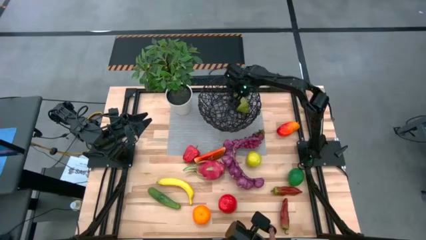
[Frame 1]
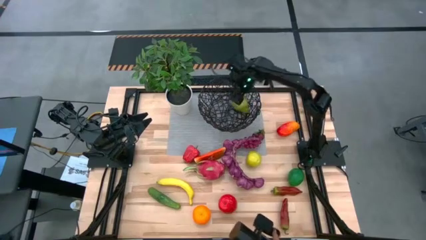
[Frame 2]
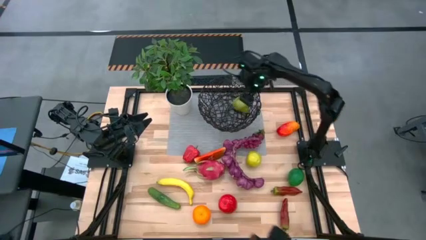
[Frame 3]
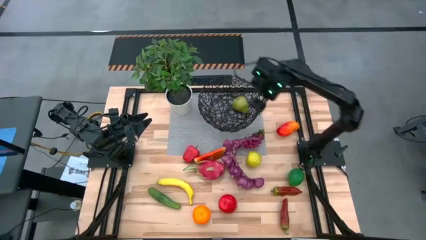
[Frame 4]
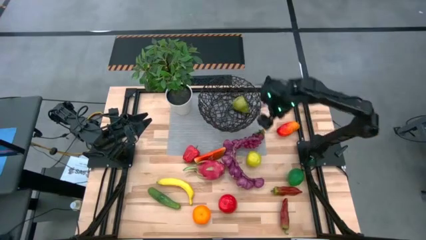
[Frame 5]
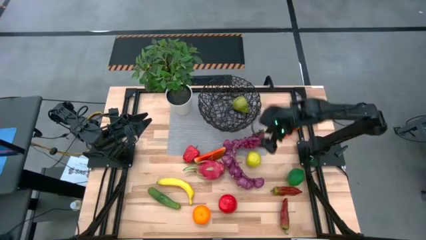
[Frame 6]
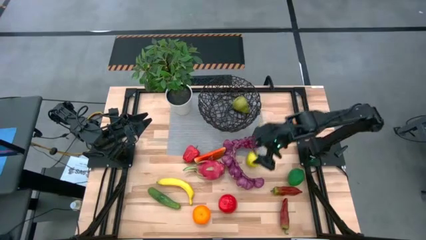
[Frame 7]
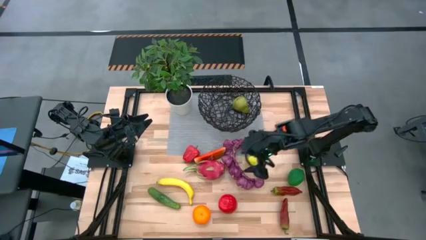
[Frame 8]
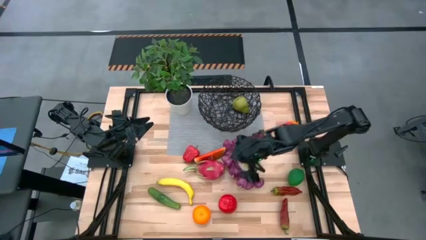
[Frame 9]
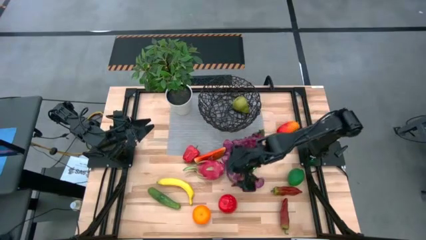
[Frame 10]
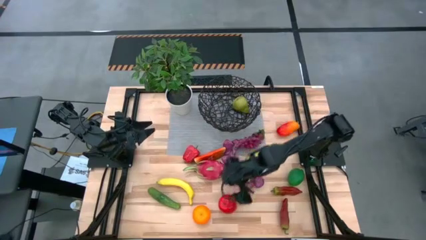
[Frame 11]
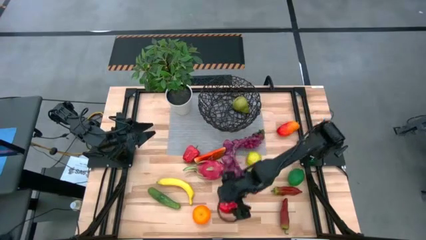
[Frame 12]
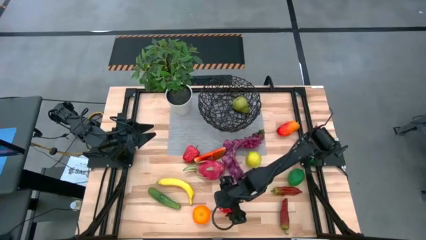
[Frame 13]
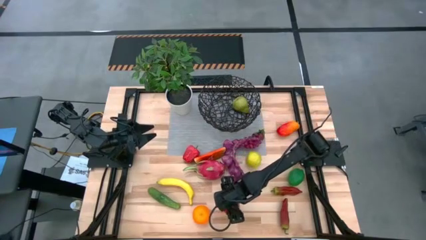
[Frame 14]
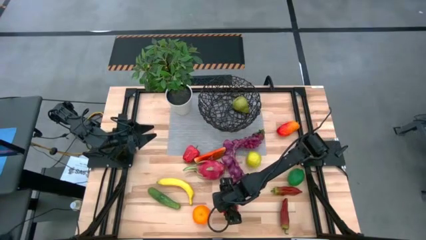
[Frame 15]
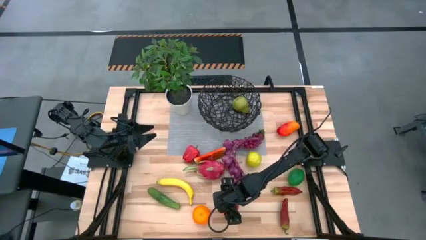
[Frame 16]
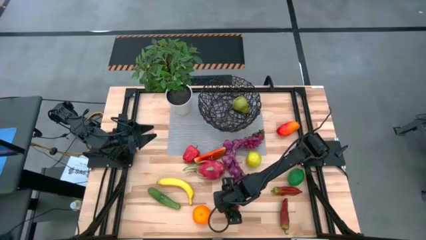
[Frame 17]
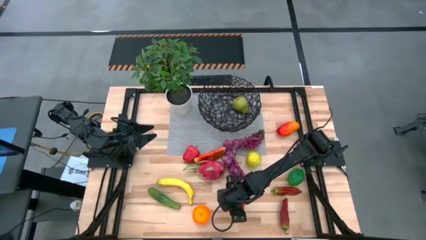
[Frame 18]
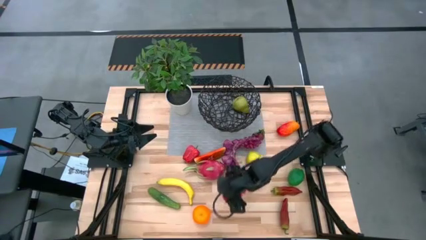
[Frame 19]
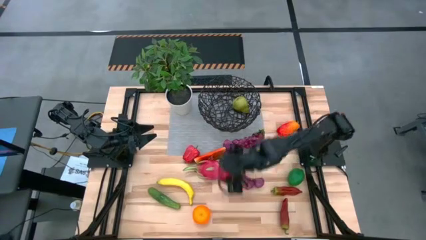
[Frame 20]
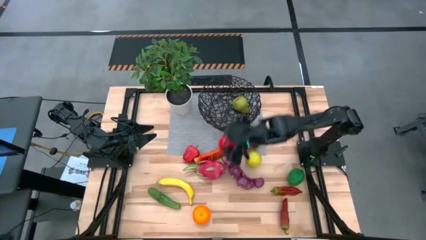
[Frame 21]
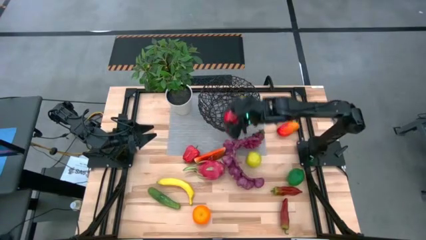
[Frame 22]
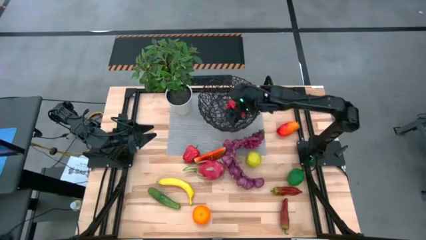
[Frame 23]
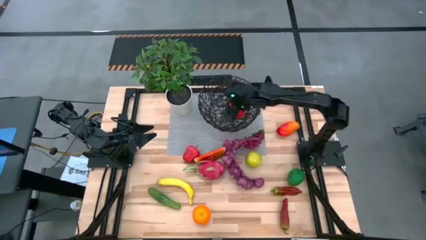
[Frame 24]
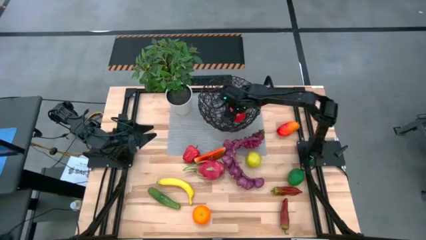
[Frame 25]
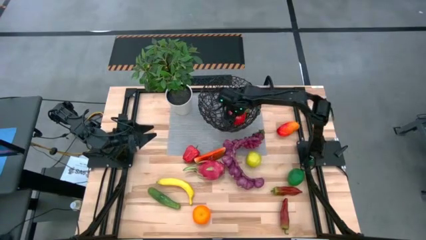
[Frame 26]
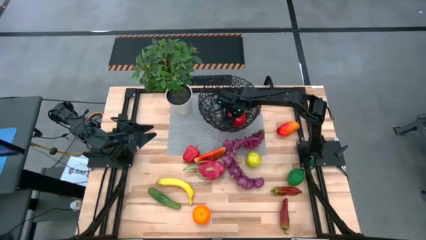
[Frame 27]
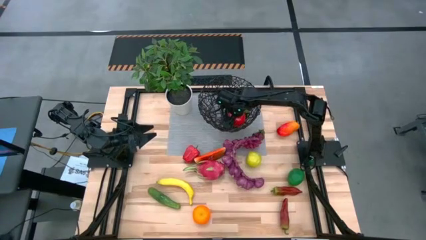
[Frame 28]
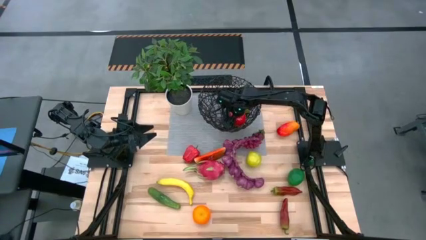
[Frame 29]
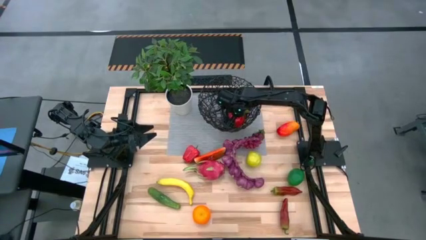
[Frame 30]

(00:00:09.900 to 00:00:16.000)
Task: Build produce basket
Put the red apple into the black wire basket

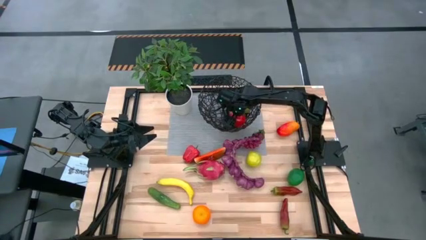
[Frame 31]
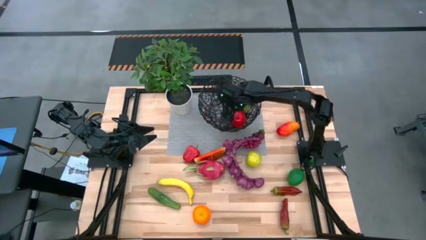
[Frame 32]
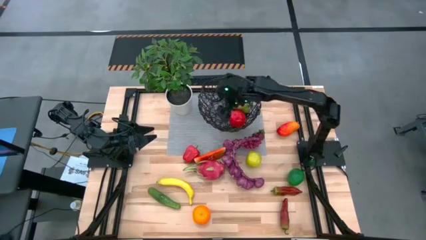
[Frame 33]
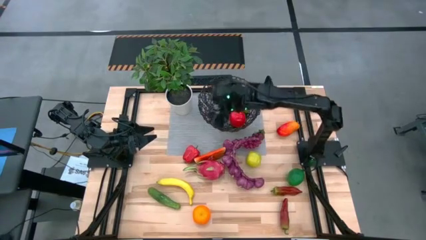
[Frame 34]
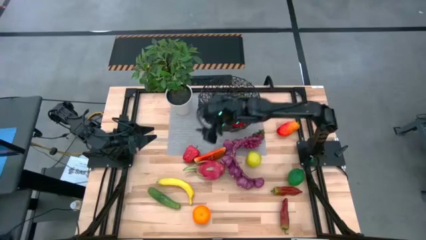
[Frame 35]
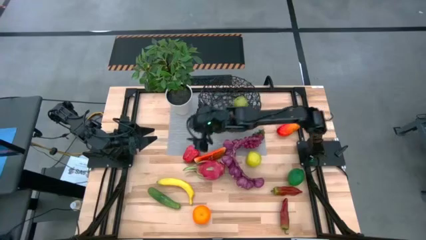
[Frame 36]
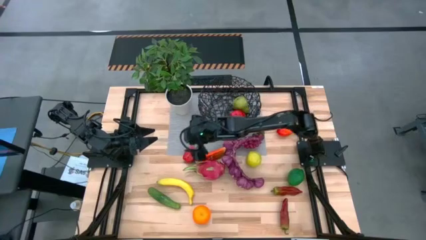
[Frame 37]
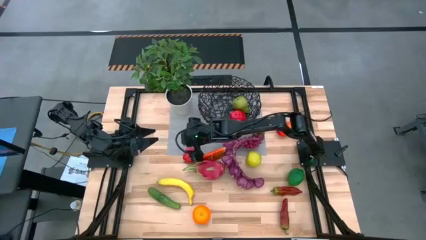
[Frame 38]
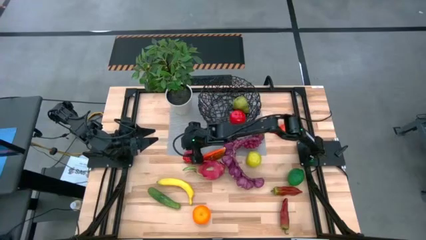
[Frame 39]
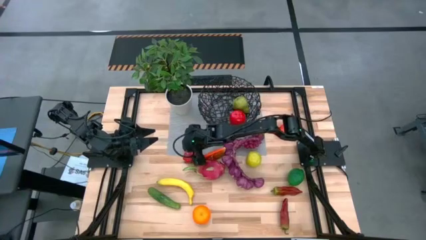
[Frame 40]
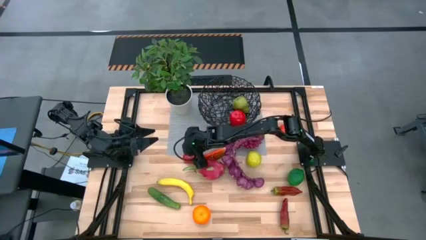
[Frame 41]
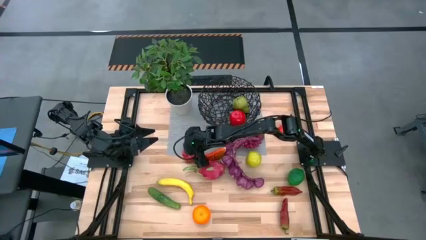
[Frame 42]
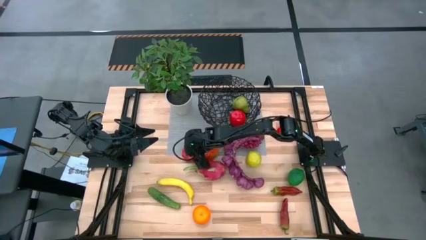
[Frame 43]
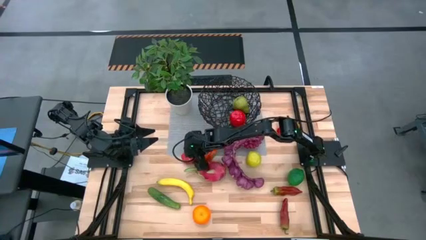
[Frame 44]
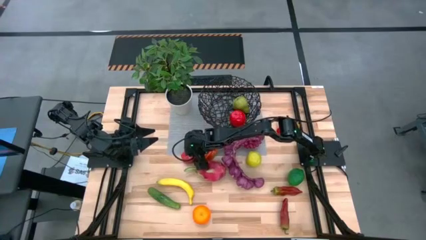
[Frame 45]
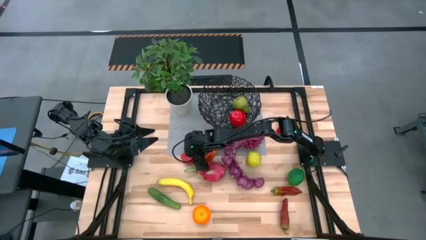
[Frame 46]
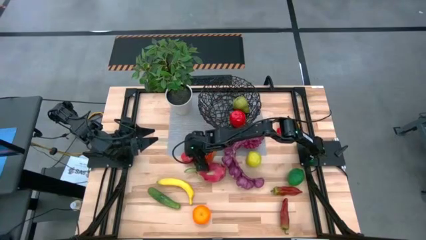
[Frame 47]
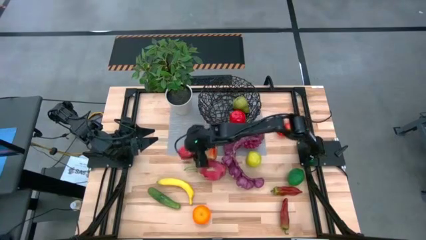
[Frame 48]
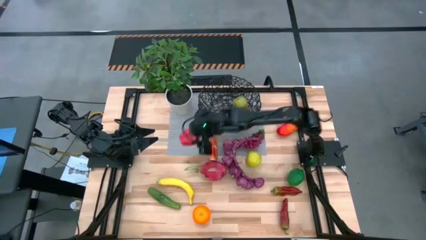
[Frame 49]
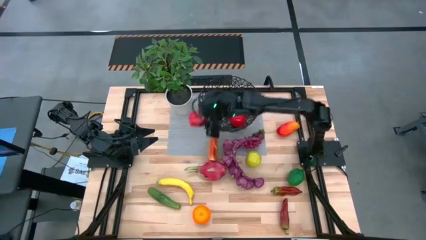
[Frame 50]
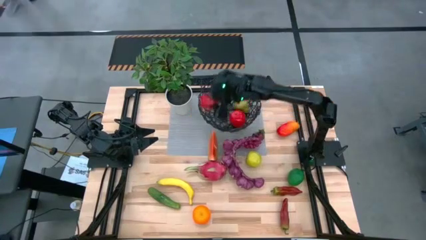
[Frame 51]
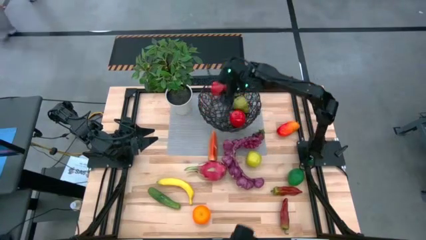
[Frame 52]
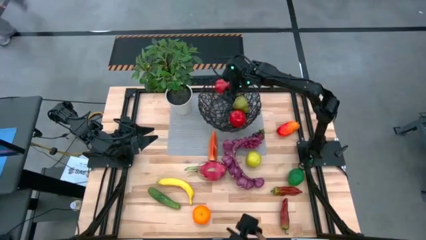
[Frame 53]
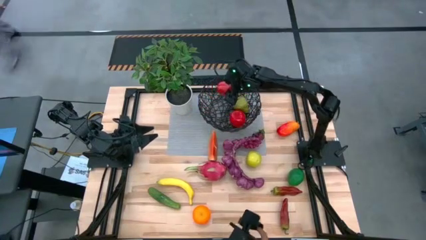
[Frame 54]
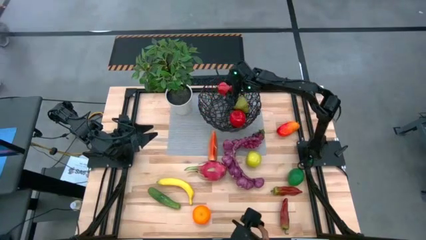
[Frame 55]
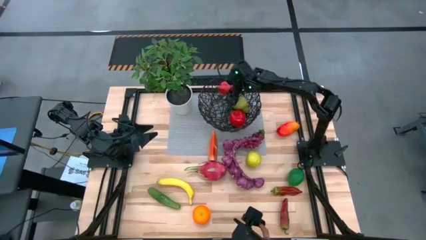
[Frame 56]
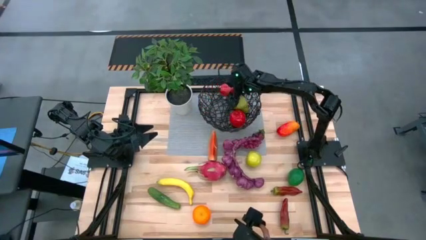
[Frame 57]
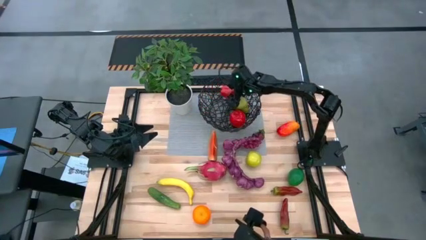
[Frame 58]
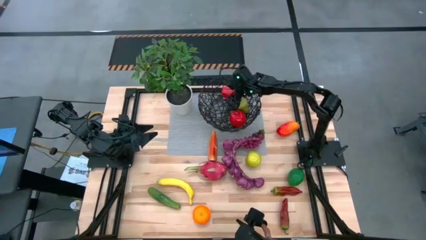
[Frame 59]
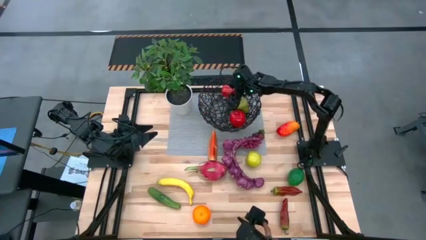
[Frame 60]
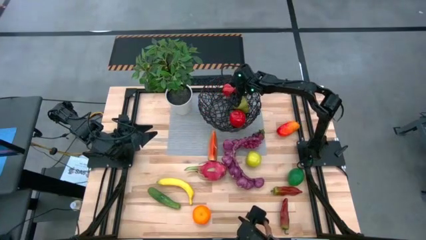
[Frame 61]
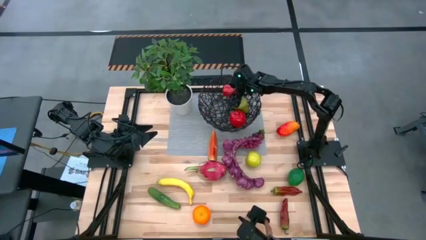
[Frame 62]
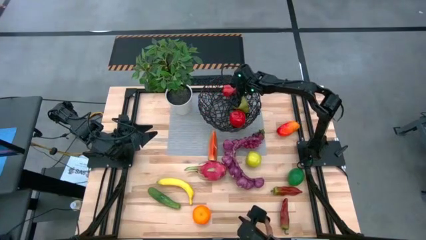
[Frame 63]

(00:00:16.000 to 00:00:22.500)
Put the red bell pepper into the black wire basket

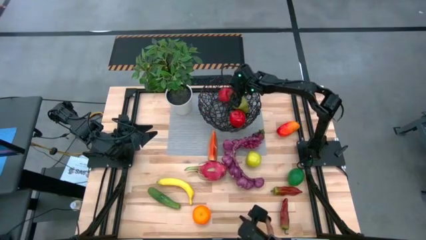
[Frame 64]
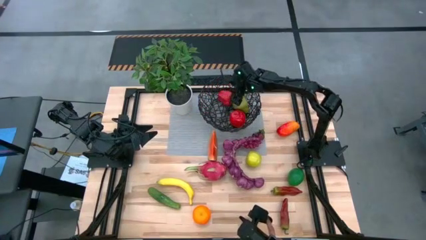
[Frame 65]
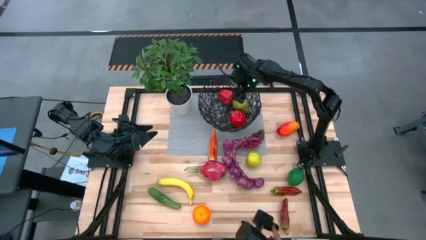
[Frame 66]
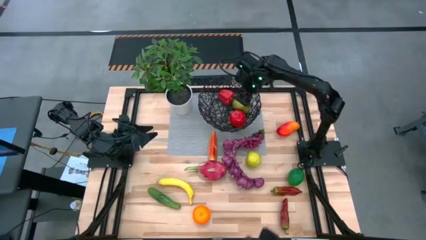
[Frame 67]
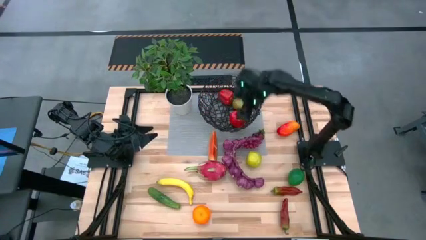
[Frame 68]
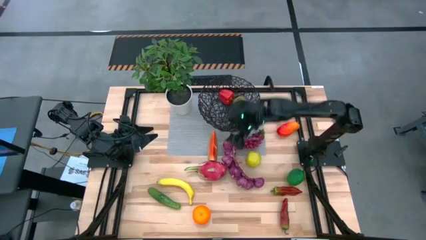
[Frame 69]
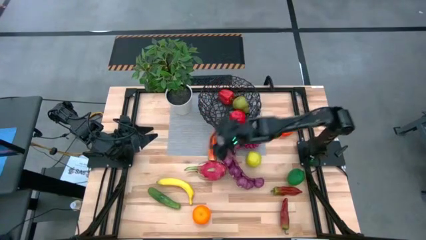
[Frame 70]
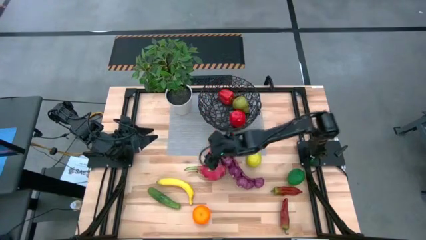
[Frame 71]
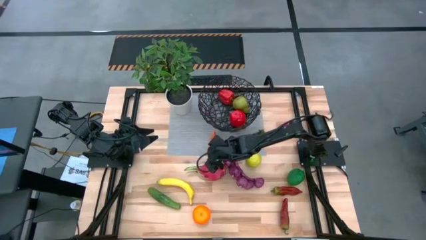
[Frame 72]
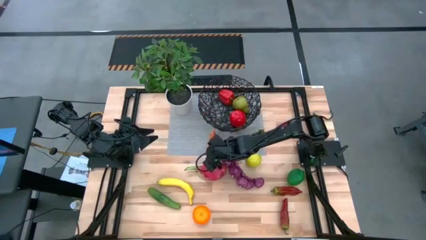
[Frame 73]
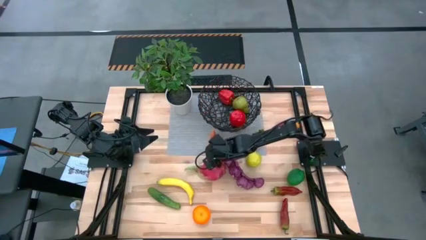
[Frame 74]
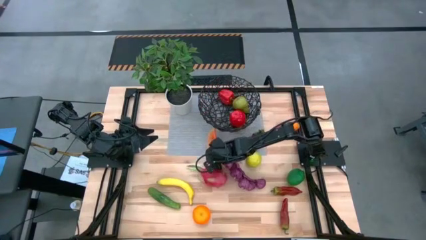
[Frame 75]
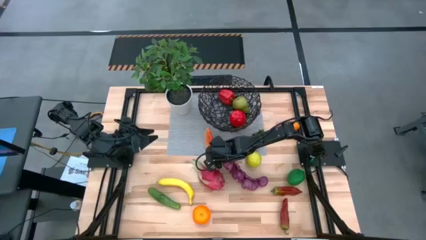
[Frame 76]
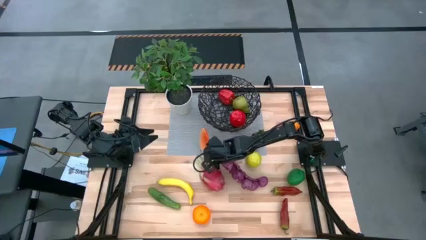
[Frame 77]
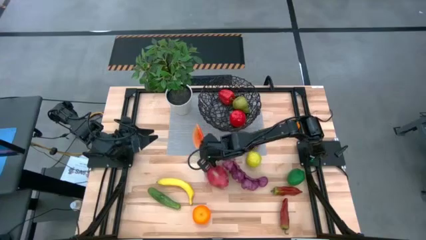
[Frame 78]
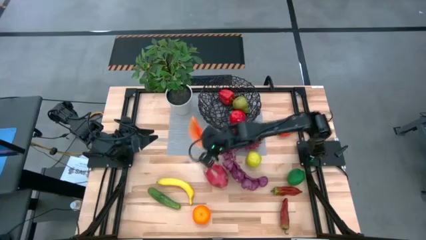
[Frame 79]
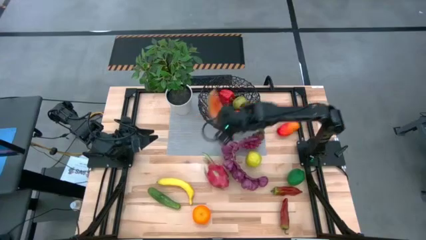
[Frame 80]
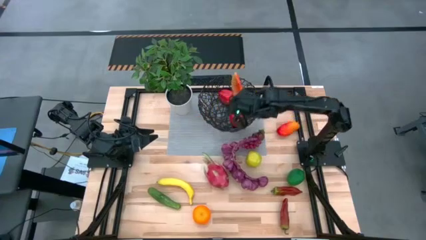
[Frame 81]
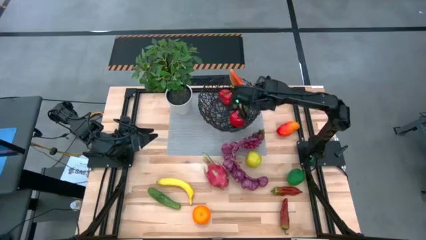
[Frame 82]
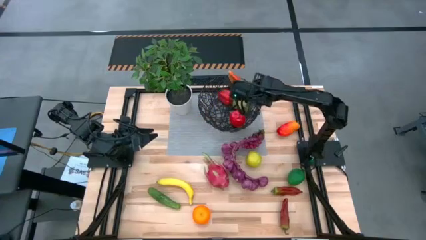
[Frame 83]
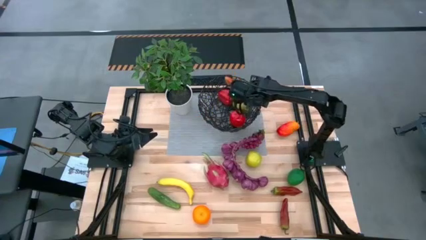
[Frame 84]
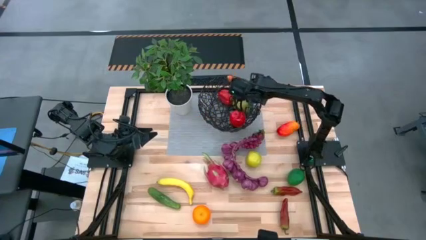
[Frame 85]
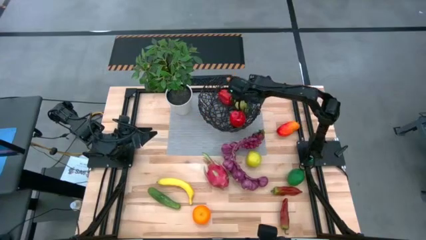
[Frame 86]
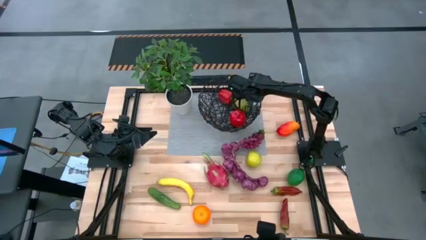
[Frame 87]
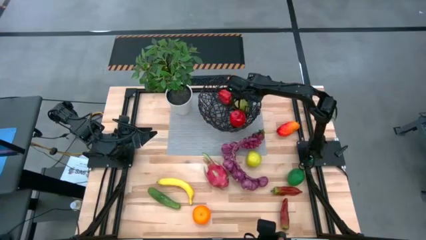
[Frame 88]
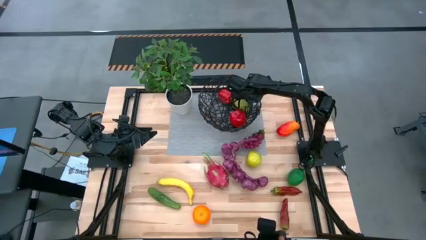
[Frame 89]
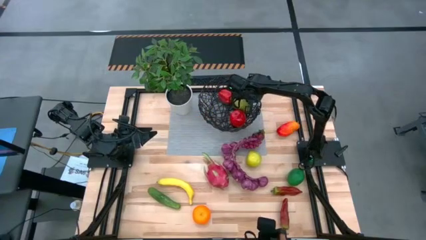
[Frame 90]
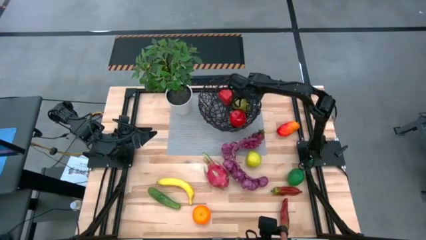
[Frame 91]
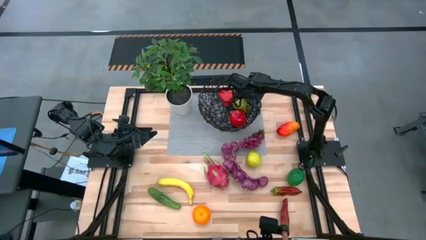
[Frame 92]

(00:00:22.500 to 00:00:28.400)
Put the orange watermelon into the black wire basket
